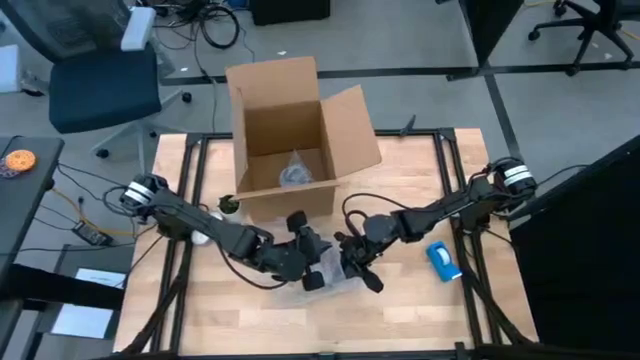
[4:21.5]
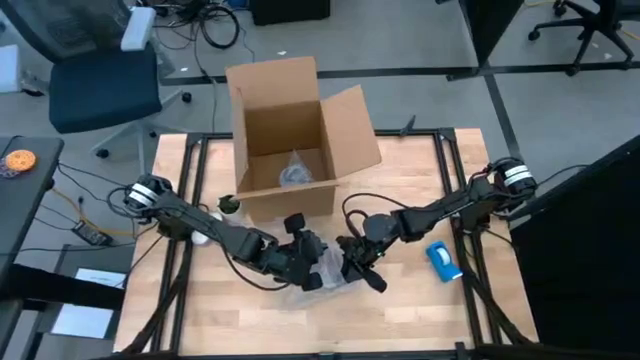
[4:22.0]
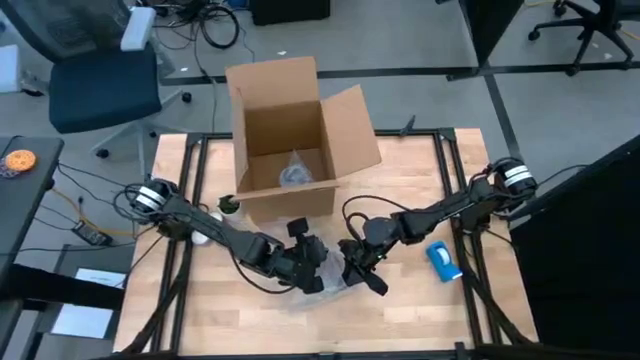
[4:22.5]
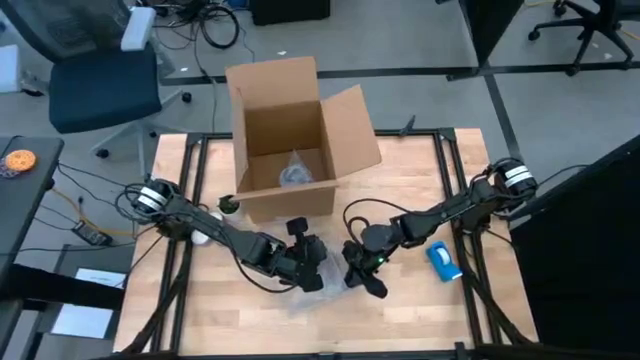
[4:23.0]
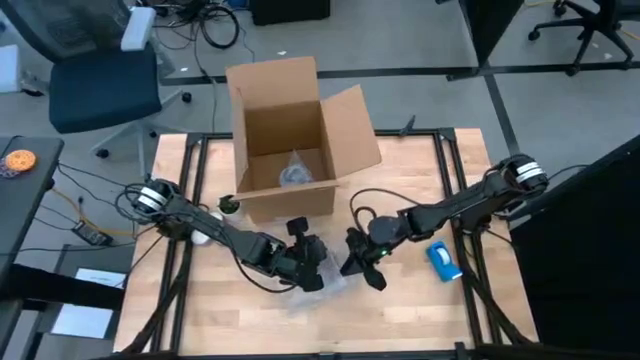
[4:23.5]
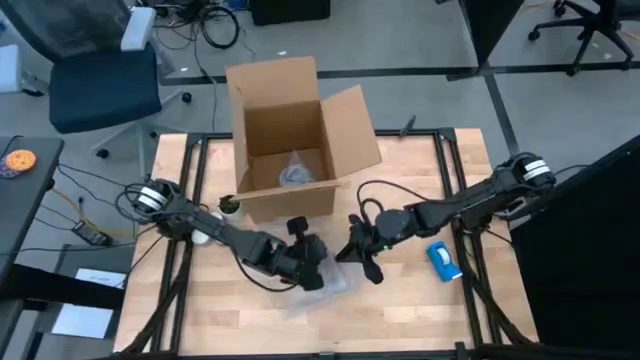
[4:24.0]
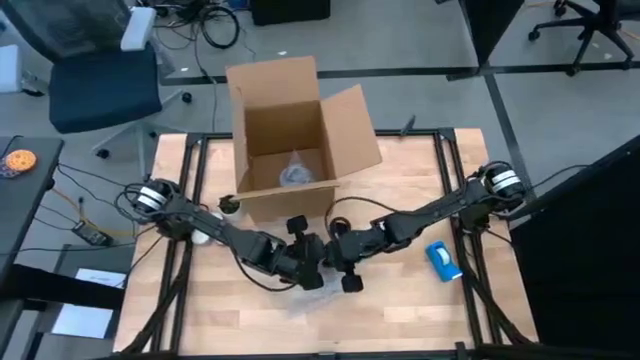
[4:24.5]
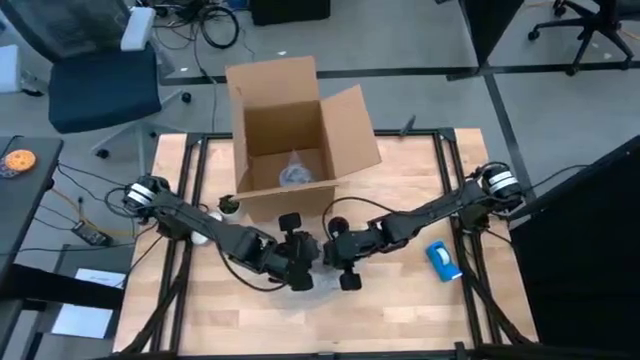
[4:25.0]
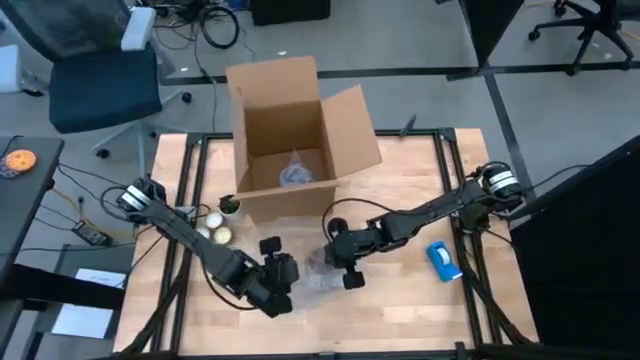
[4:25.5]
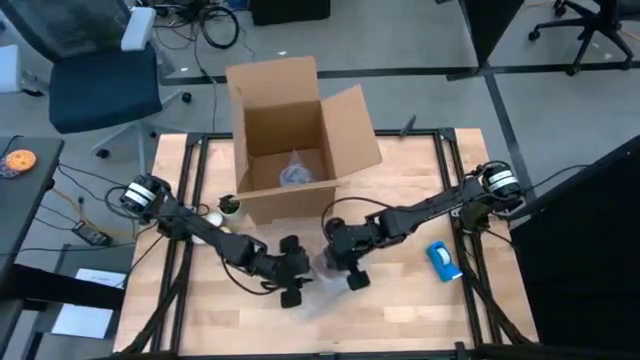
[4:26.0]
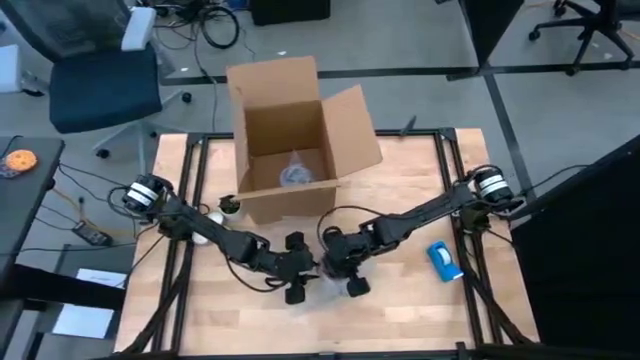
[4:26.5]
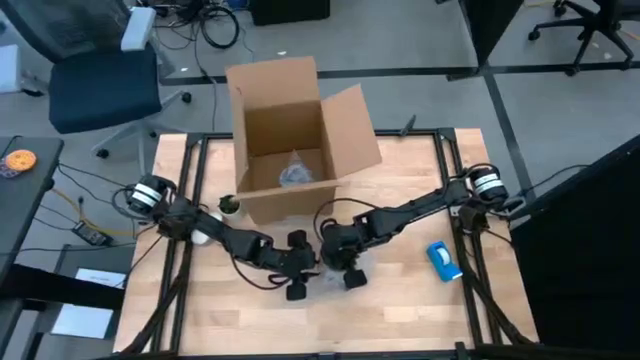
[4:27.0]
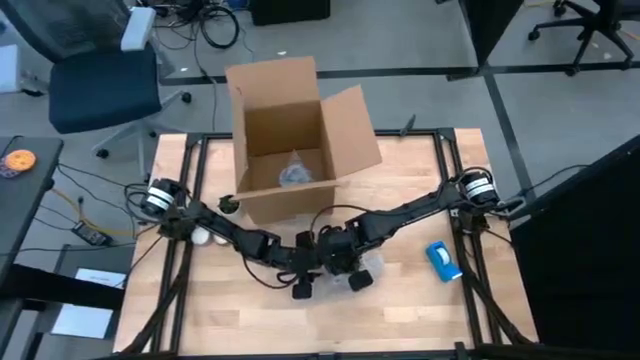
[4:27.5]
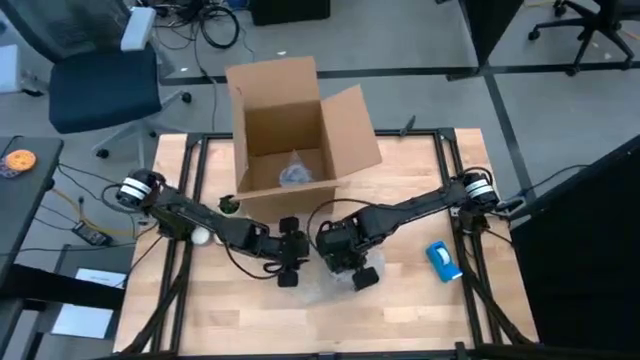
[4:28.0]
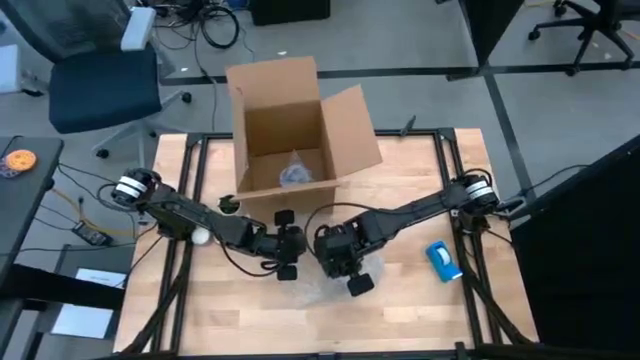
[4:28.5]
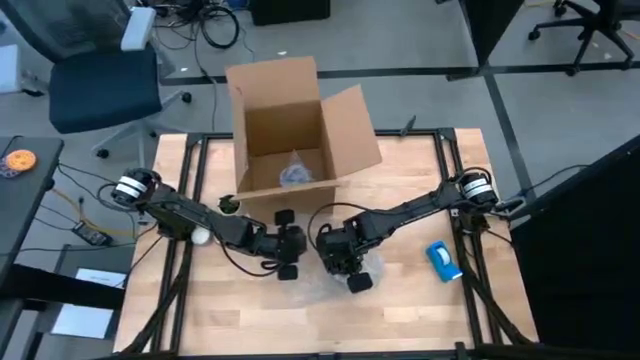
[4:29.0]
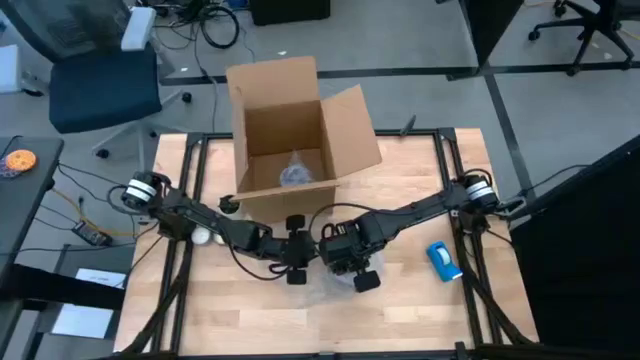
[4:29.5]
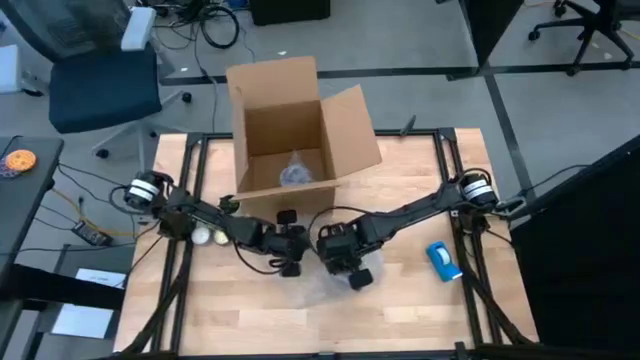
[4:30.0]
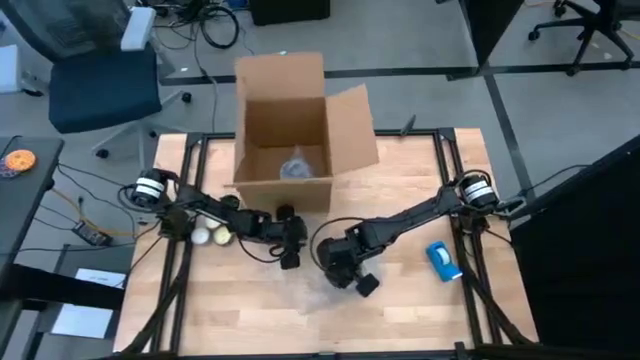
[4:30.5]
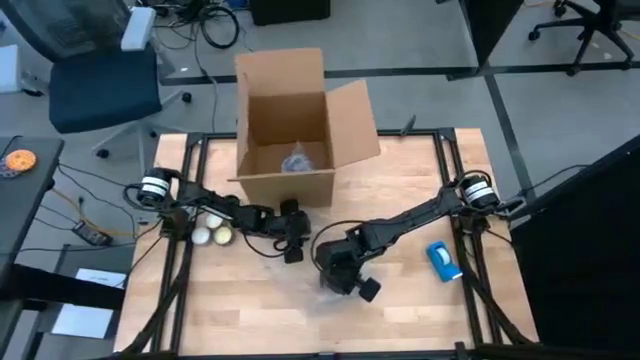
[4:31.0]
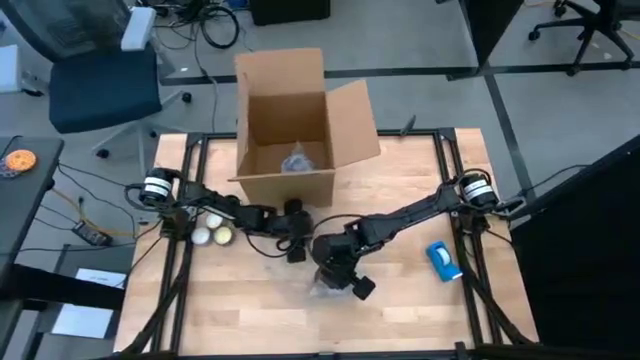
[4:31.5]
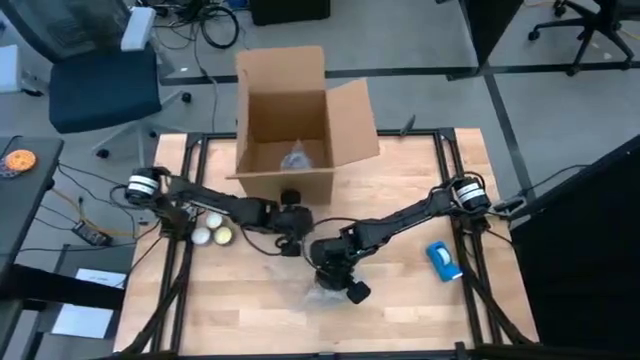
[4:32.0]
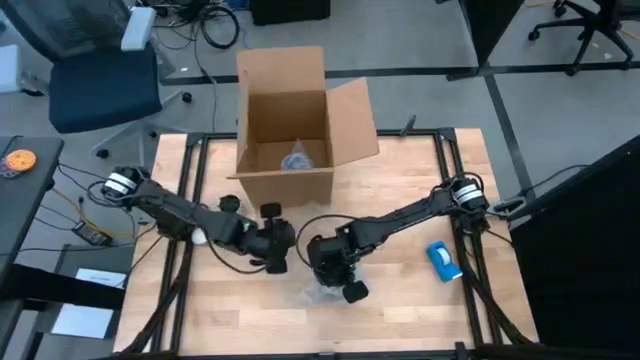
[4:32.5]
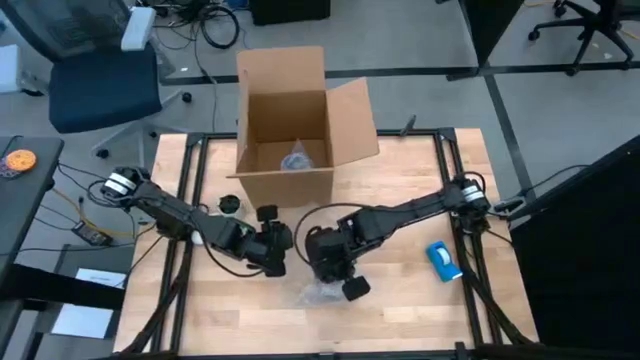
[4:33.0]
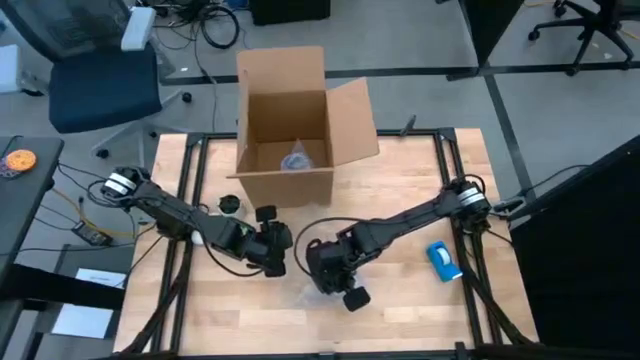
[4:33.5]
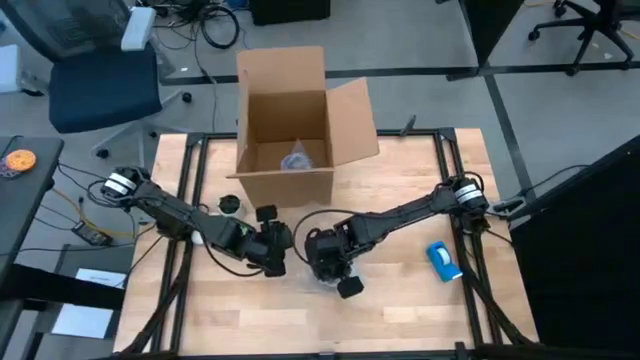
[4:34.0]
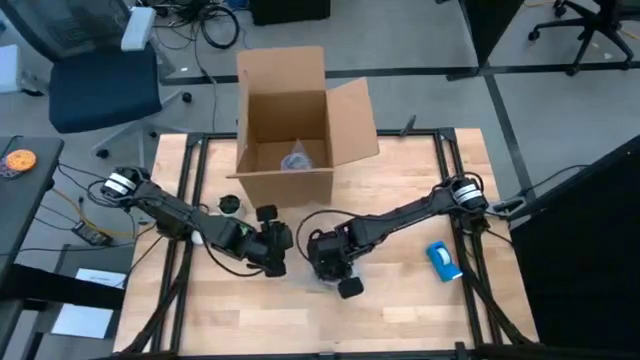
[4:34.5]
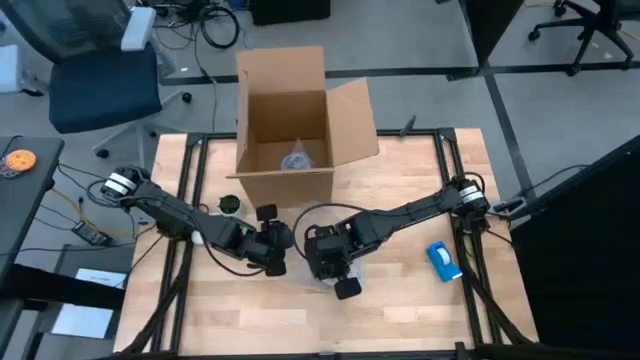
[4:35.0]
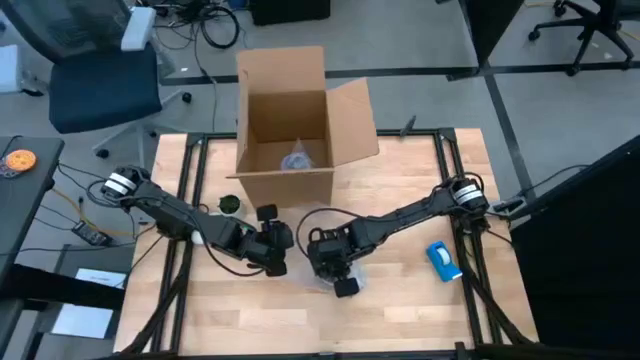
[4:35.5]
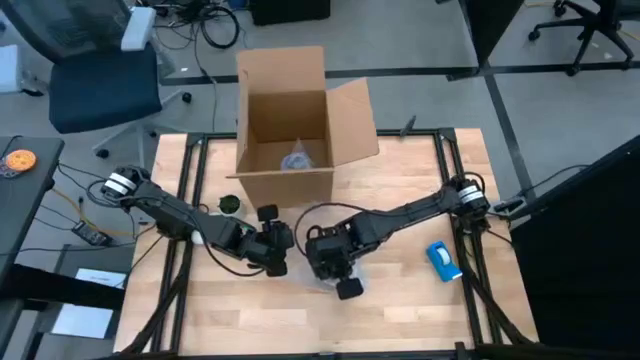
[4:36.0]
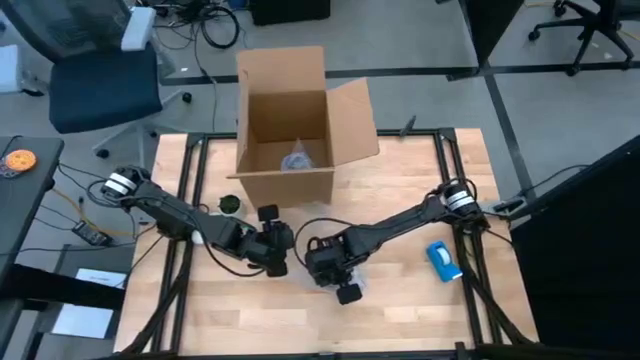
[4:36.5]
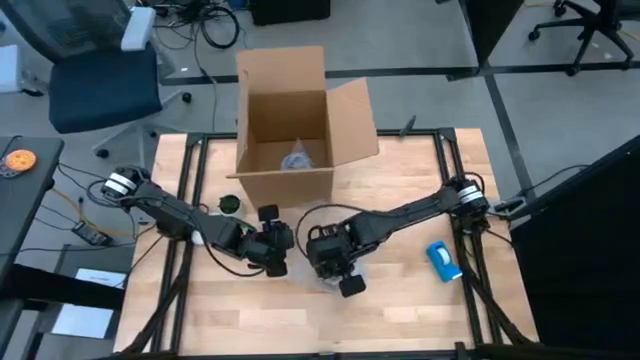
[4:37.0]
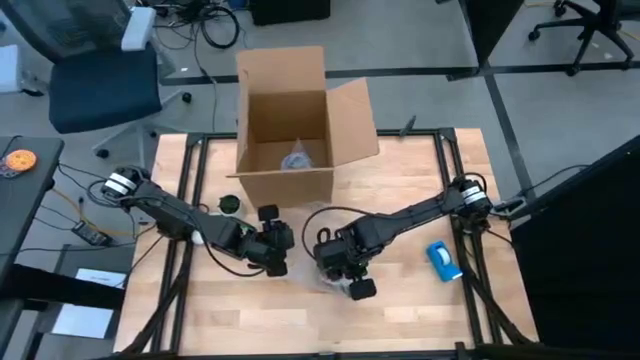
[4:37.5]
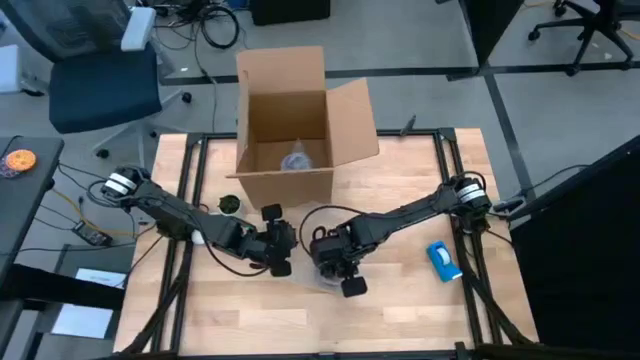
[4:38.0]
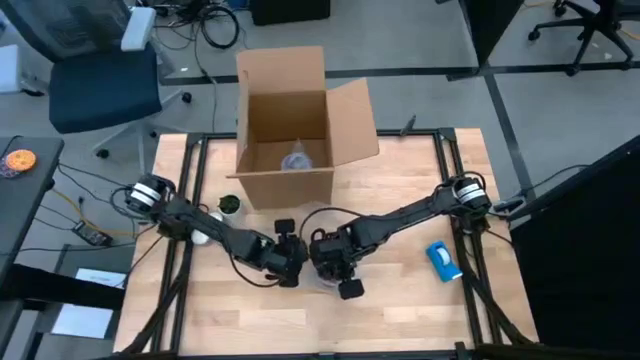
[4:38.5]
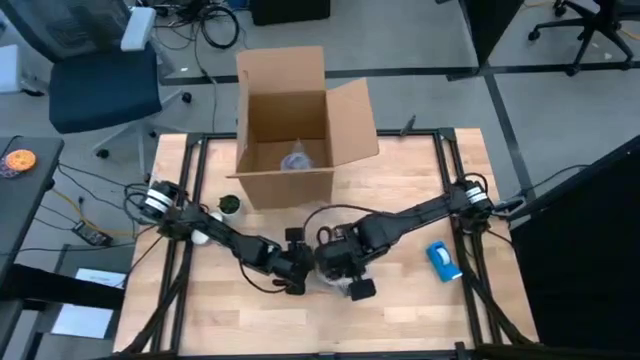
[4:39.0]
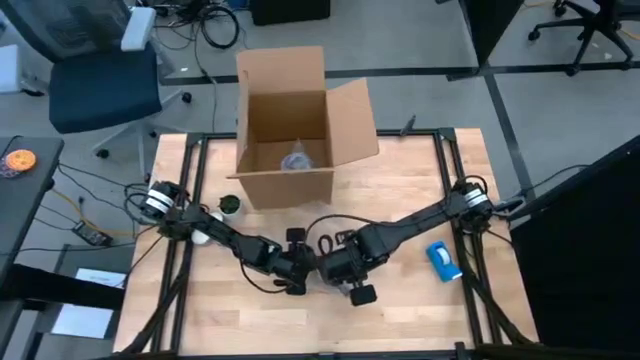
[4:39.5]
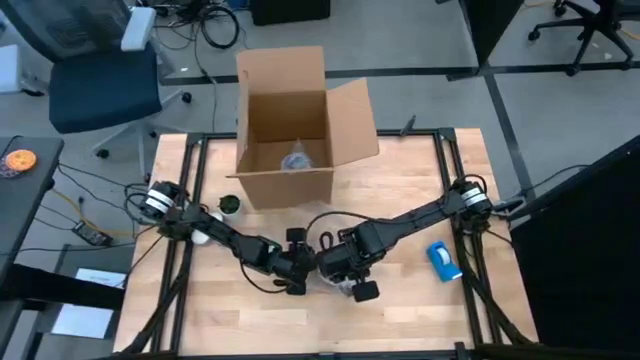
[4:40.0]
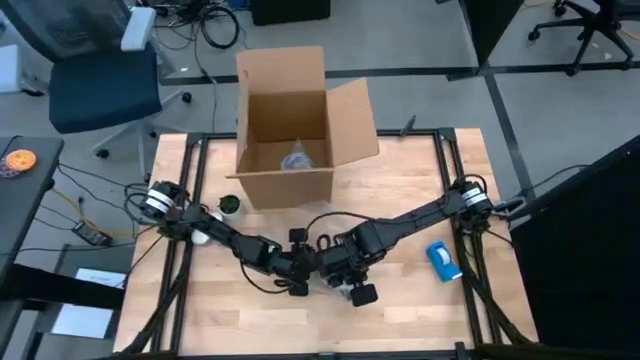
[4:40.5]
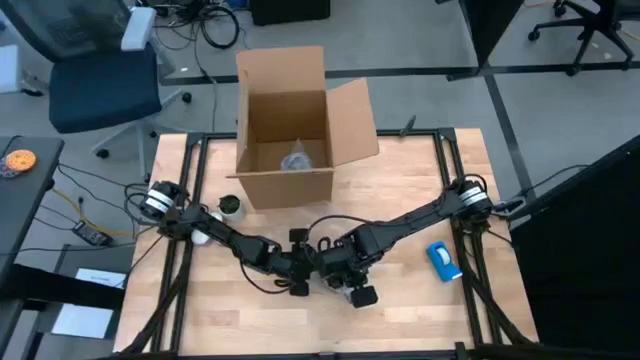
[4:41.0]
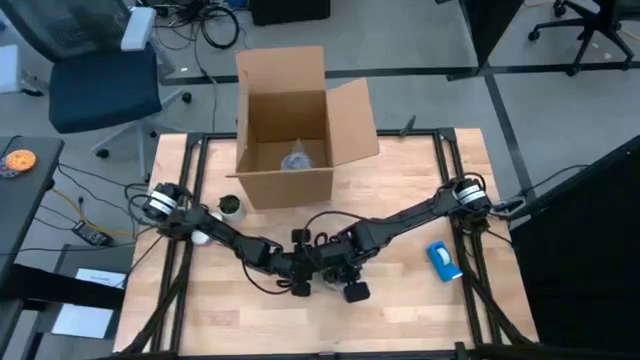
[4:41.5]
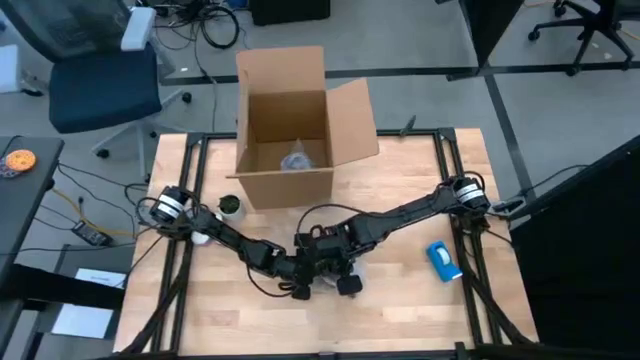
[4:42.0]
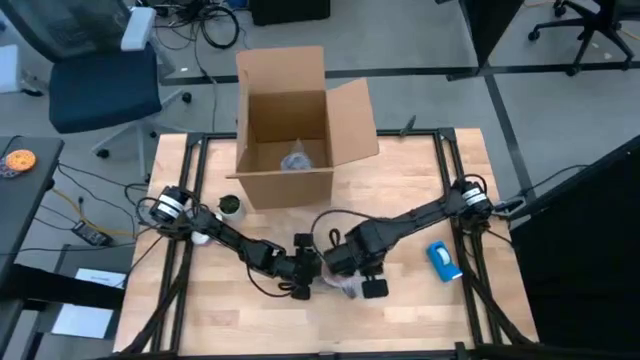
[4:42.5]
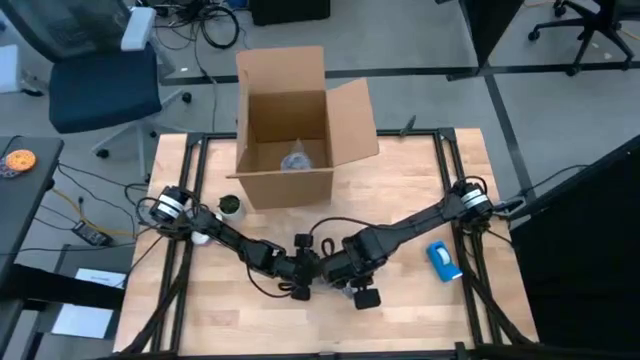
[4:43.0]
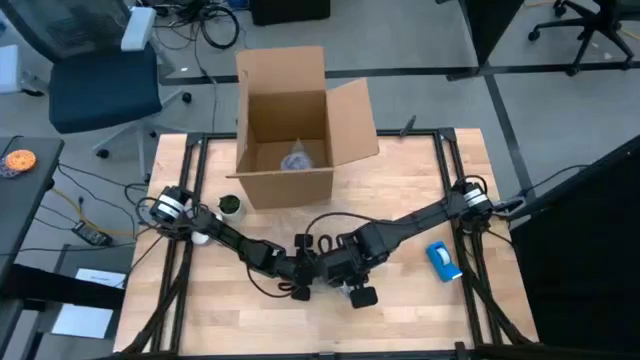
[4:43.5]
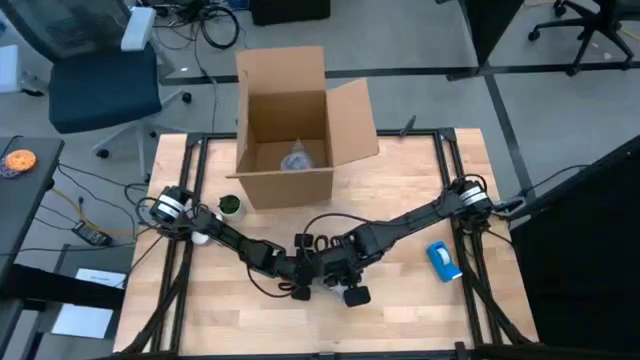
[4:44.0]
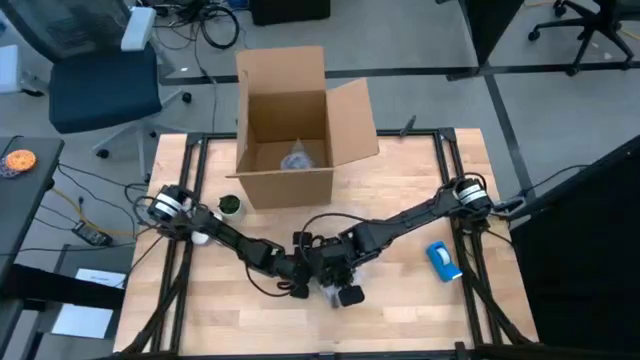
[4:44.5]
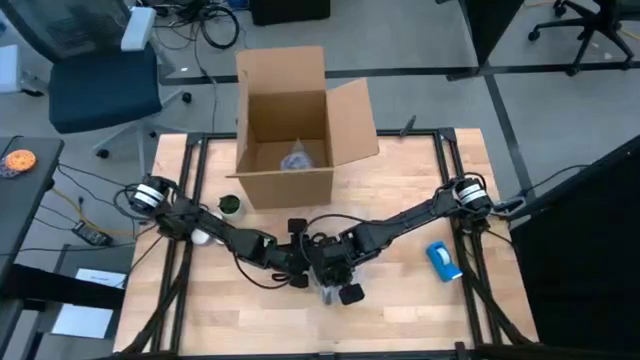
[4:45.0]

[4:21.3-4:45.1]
Task: wrap mug
Wrap the black mug with bubble wrap
